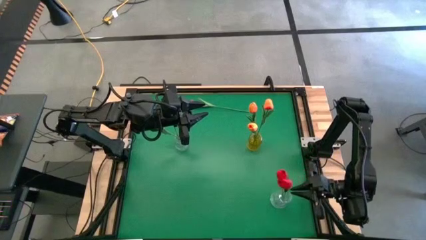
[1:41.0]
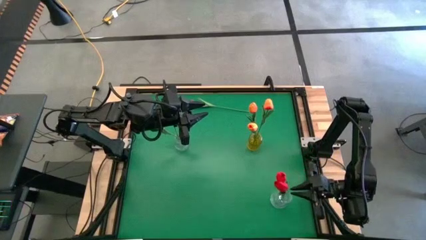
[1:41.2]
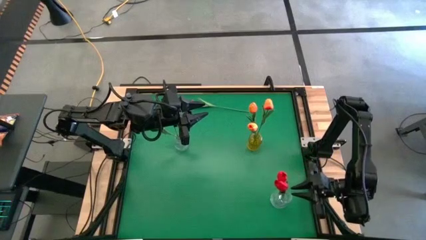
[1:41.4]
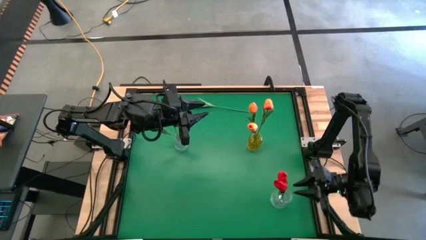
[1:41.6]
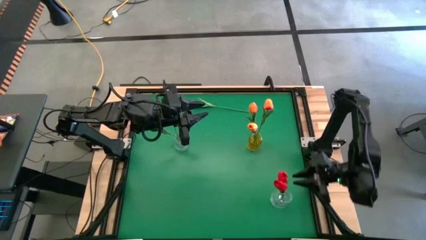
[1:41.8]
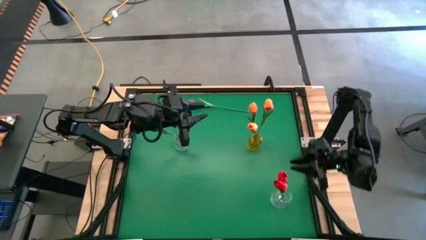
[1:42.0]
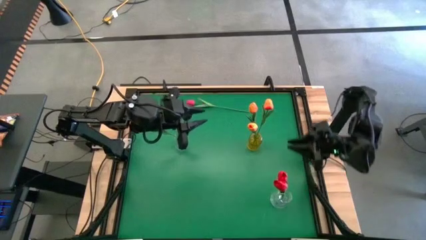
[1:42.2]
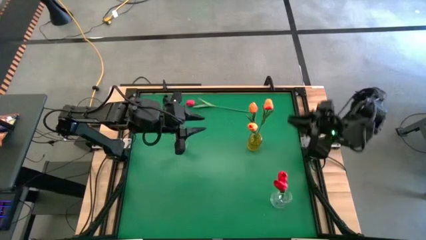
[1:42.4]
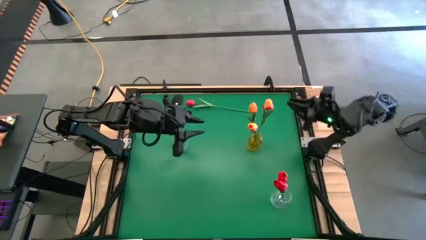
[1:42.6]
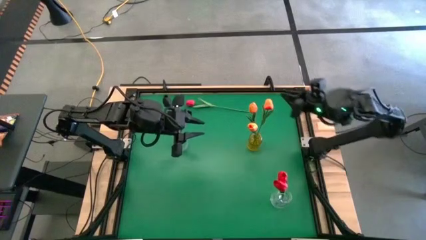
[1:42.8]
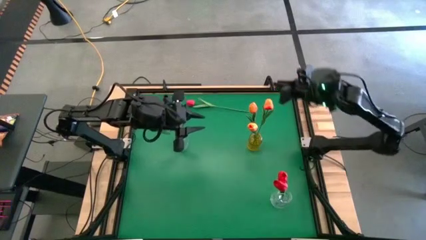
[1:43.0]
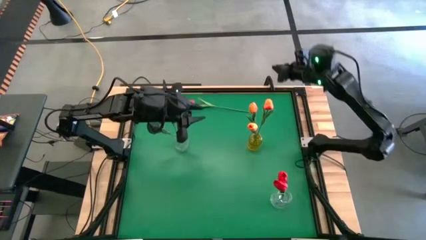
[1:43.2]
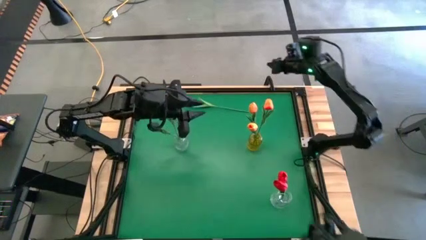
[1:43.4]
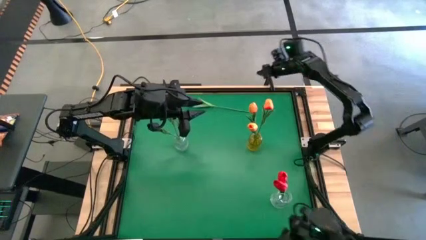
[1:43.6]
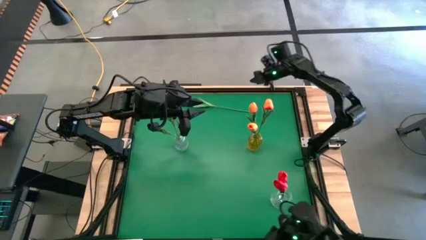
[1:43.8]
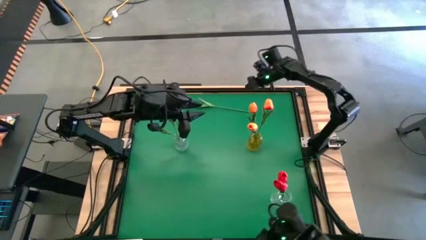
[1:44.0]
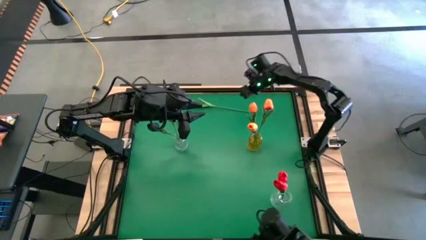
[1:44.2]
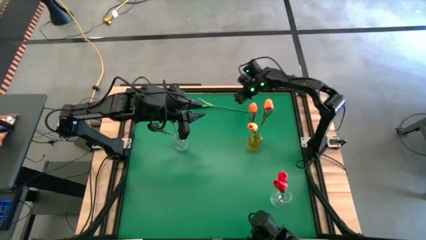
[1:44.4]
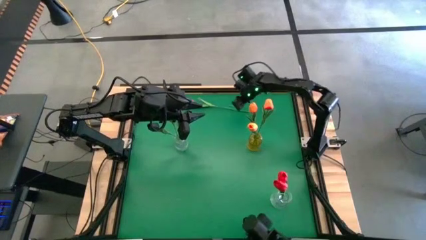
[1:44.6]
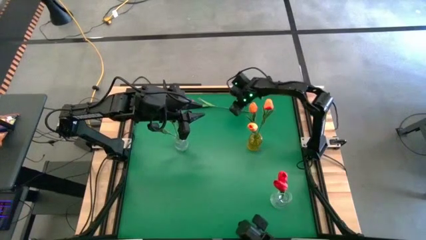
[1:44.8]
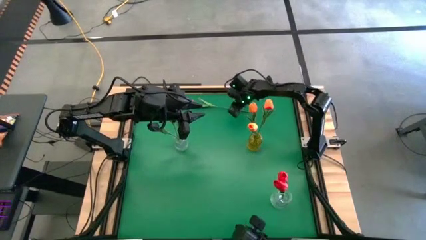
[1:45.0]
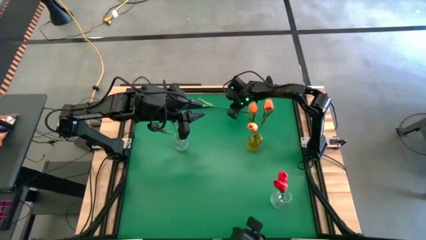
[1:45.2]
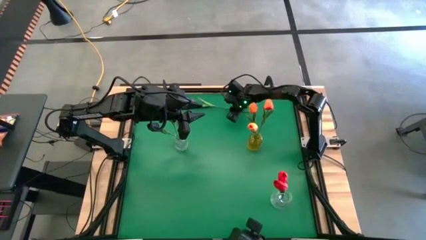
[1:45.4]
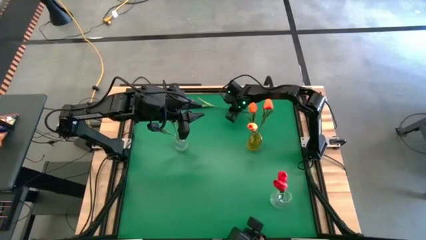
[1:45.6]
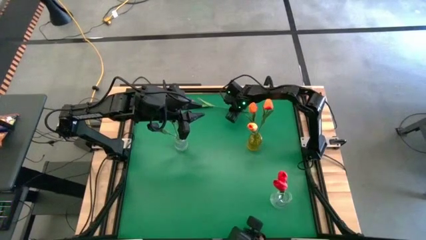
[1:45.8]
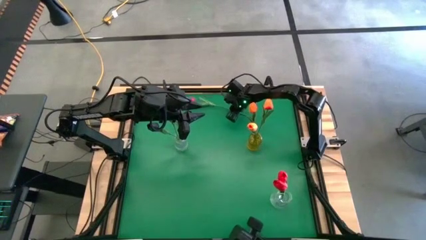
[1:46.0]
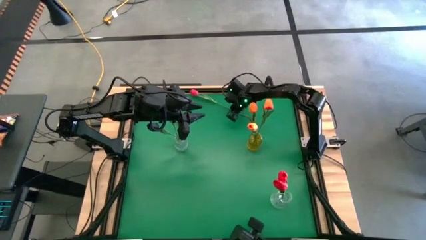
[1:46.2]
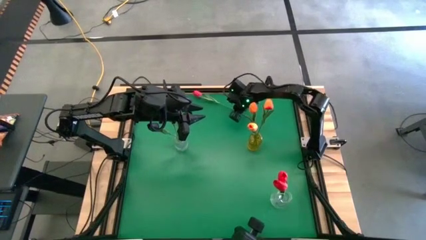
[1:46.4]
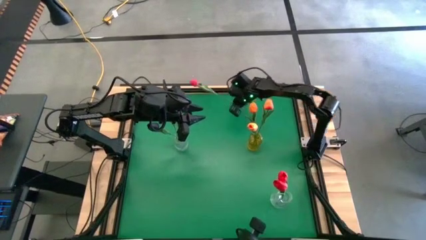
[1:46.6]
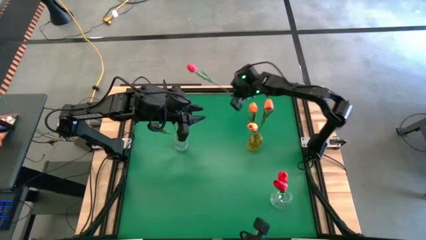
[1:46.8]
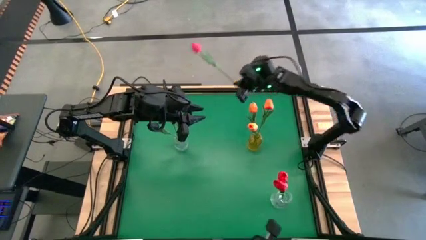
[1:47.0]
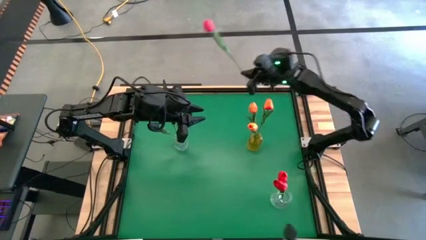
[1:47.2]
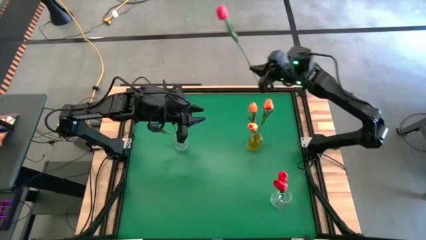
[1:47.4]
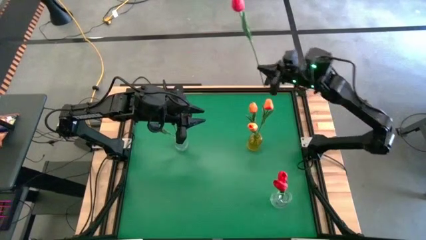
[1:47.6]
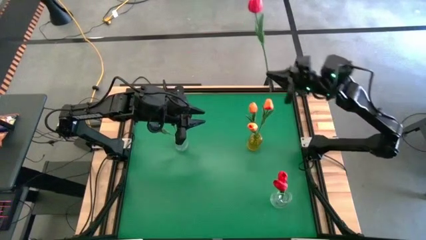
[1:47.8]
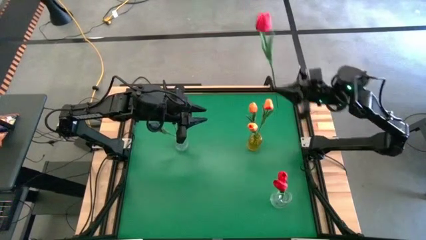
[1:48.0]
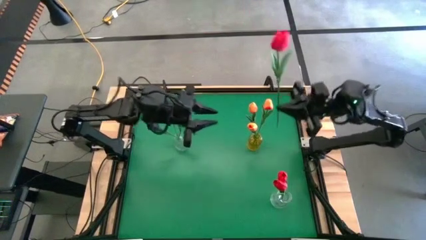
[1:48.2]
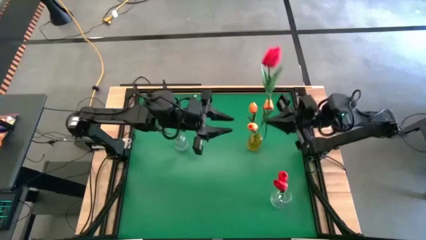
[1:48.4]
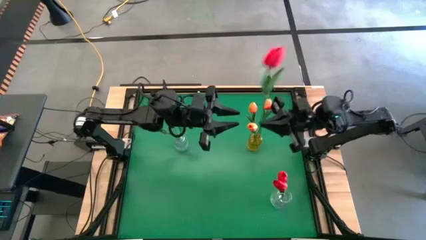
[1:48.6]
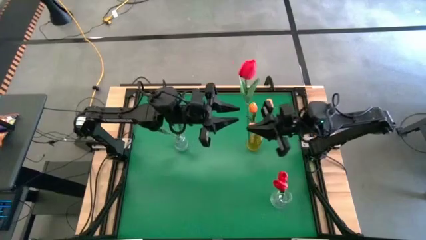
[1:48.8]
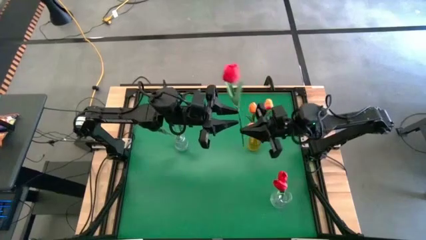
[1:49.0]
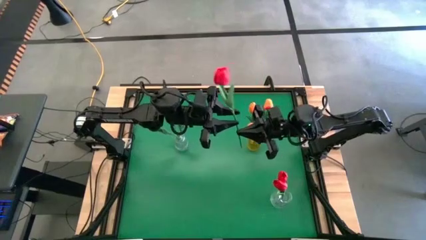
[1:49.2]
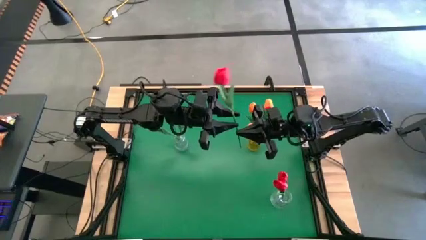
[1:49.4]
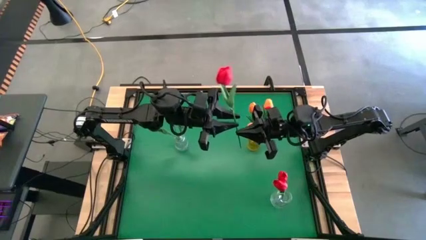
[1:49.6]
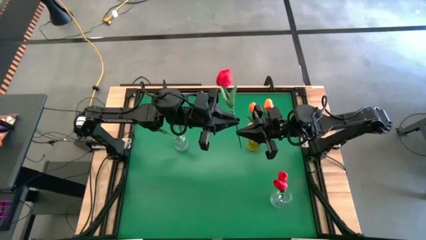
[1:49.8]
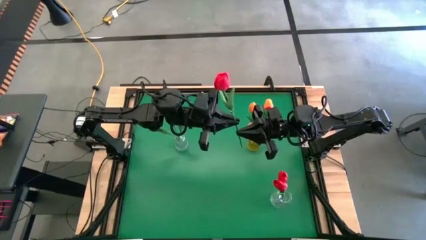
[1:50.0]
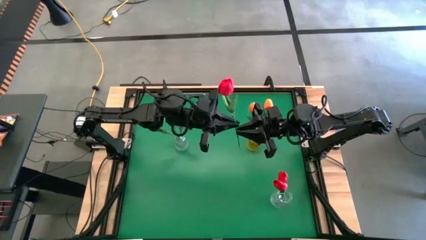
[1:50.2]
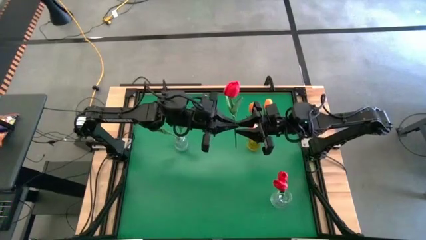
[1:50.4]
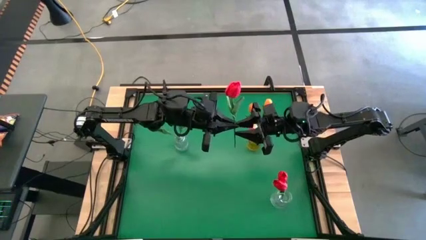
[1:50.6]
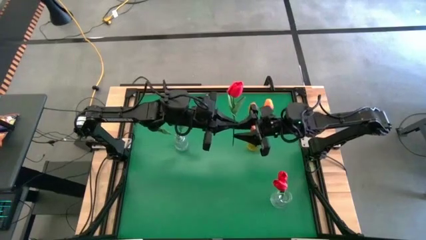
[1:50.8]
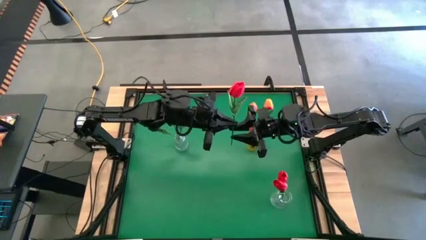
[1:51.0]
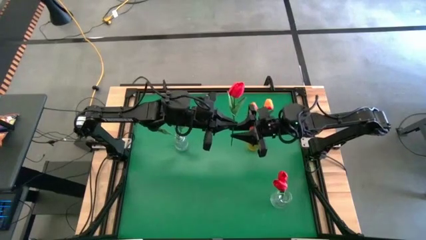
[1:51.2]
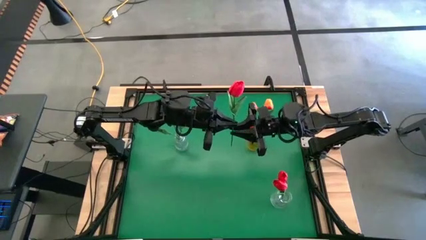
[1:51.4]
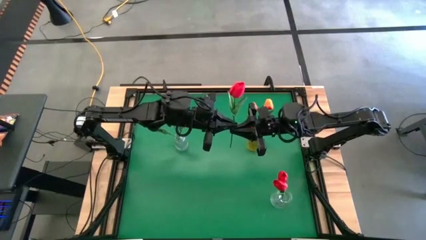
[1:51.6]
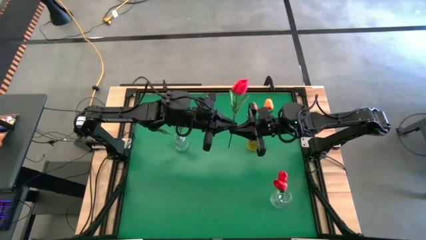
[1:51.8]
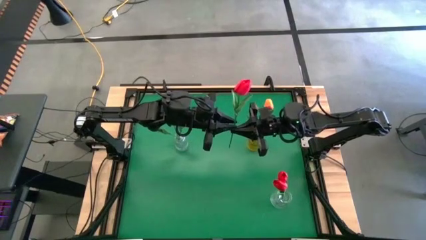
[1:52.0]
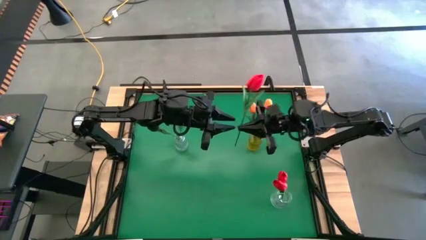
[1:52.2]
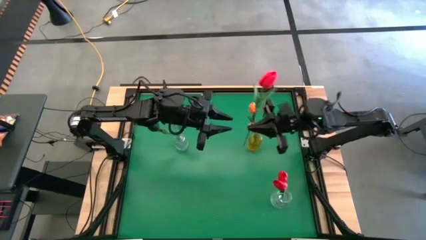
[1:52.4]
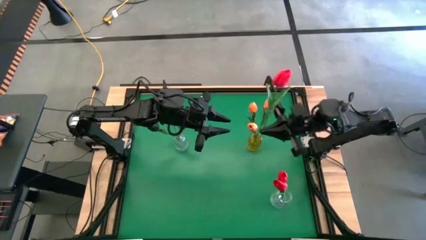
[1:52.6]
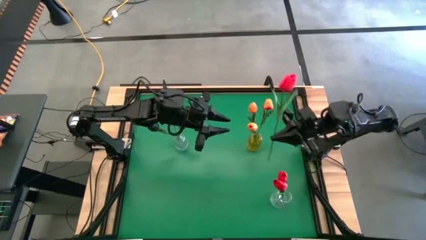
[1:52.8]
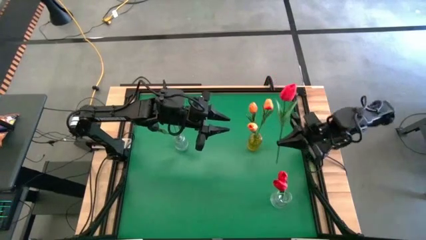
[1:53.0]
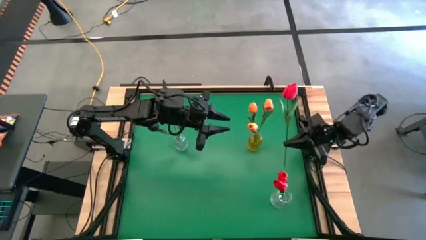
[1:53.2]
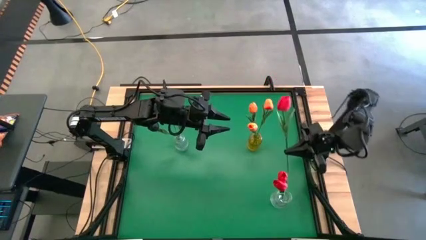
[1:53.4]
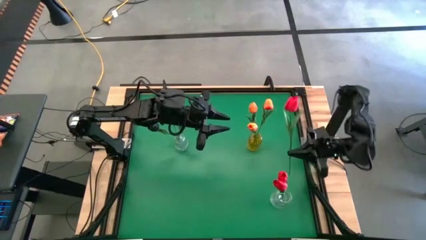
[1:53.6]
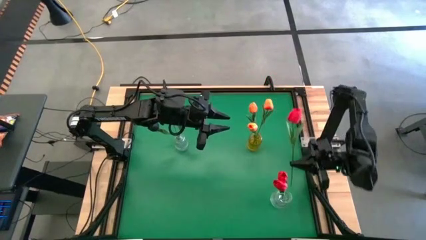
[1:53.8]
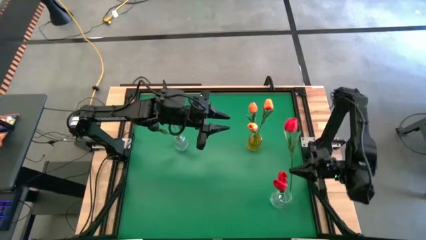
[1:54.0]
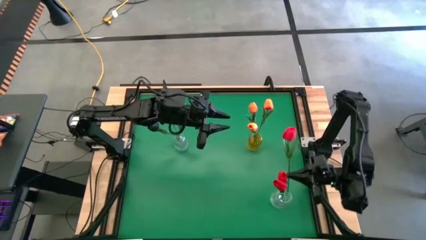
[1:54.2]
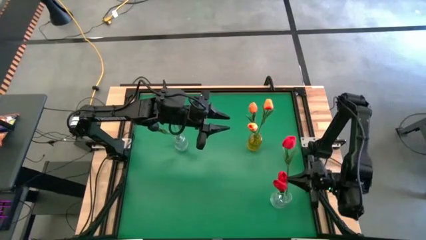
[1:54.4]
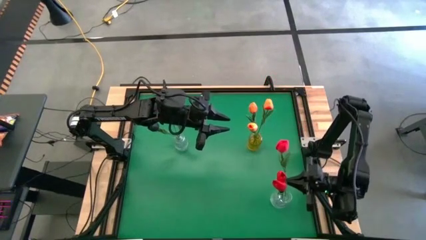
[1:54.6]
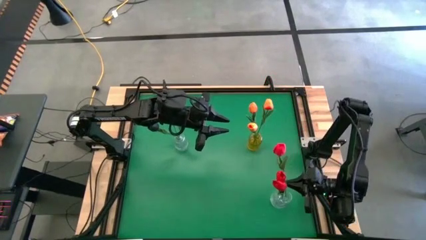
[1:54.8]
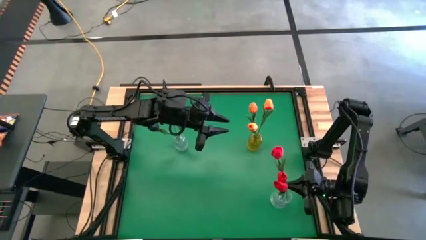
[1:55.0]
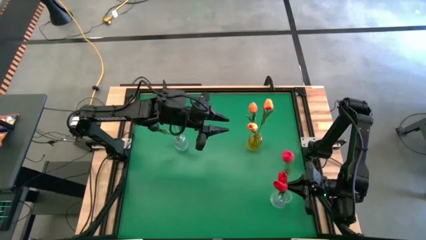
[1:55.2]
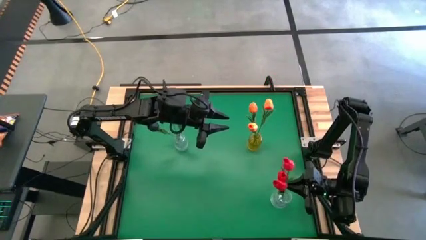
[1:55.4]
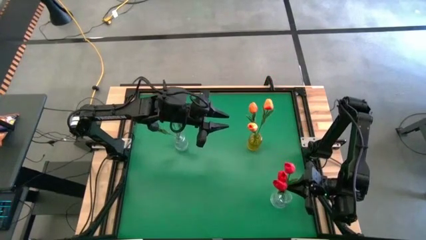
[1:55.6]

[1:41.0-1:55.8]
Task: Sort flowers into vase by color
Put the red tulip into the bottom transparent vase

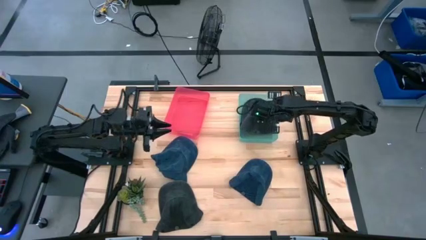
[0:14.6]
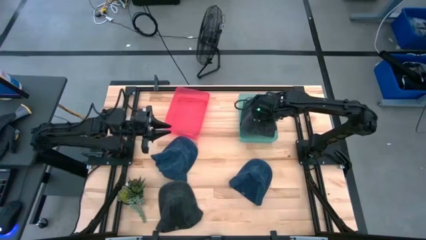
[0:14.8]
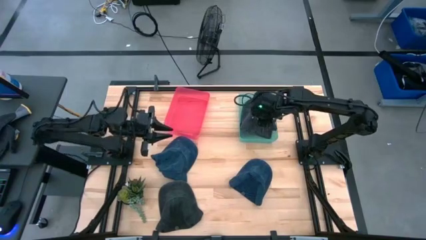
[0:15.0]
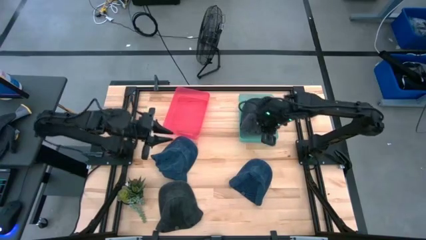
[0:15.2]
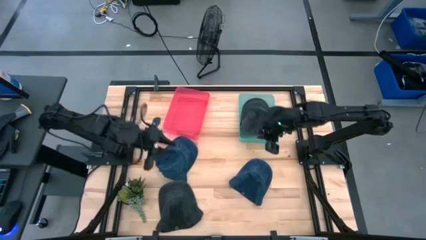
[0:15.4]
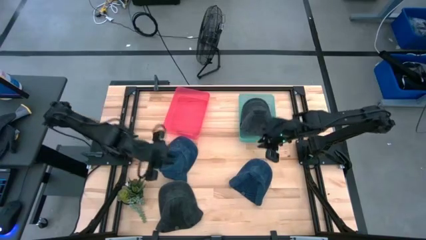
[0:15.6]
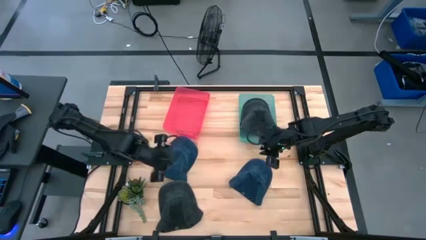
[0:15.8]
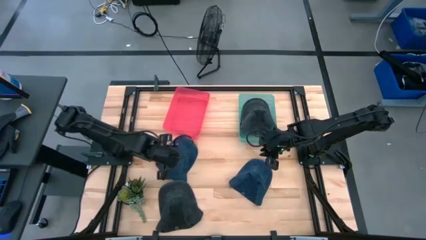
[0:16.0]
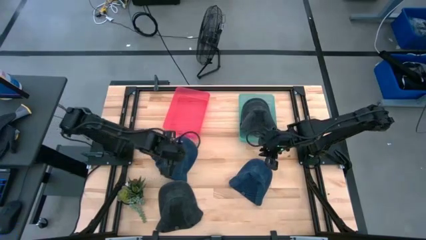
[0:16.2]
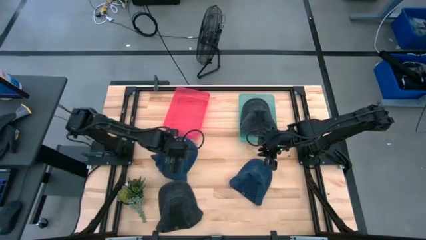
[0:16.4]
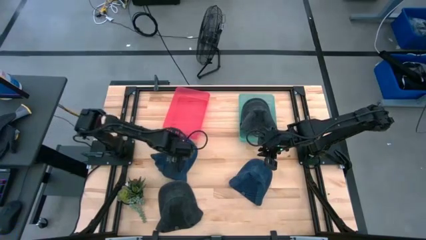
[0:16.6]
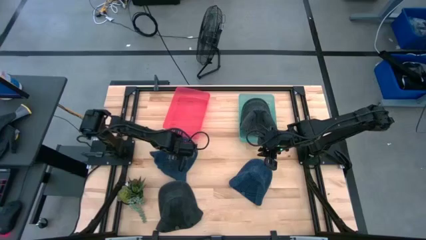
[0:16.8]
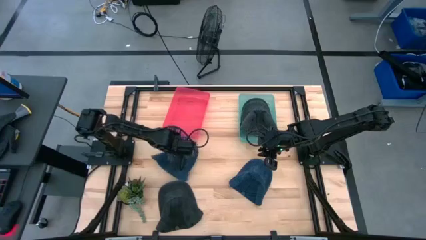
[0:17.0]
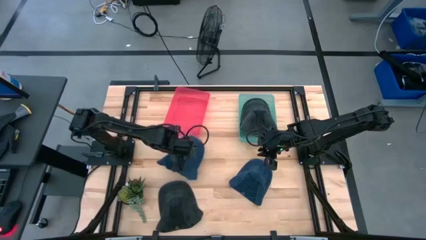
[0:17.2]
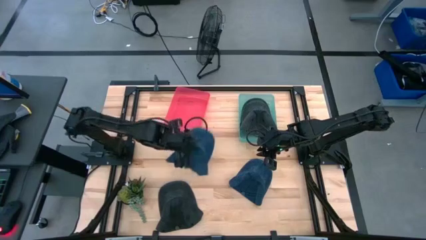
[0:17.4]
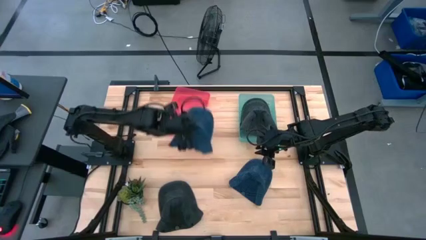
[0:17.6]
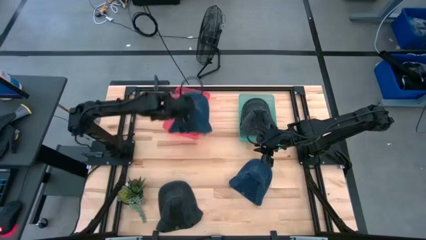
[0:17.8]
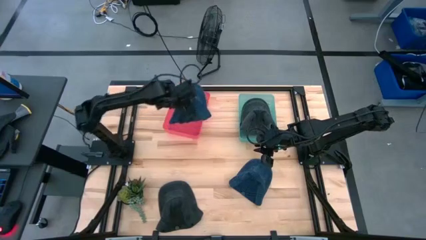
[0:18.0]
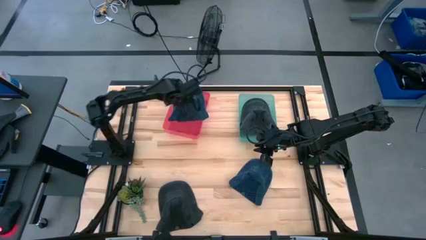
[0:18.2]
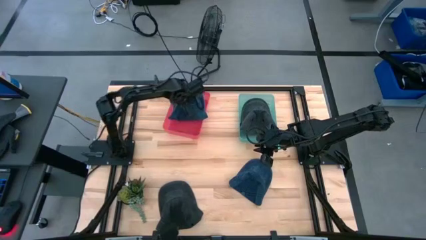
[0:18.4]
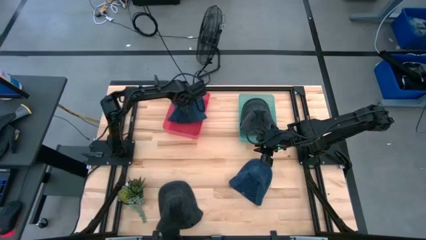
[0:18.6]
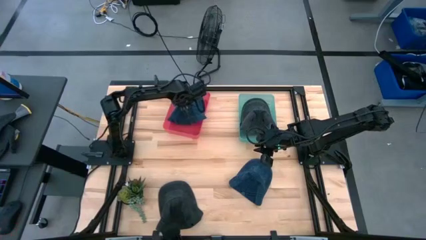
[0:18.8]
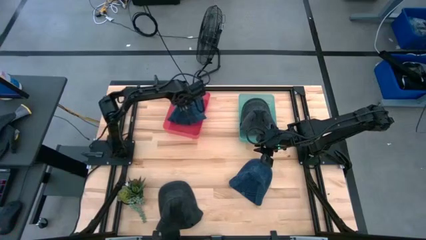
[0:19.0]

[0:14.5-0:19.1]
Task: Pick & Place hat
Put the left blue cap into the red bin
